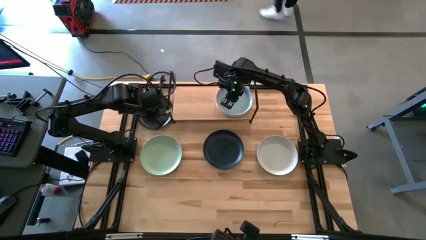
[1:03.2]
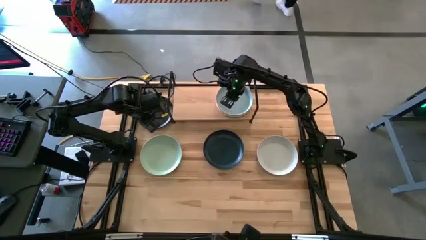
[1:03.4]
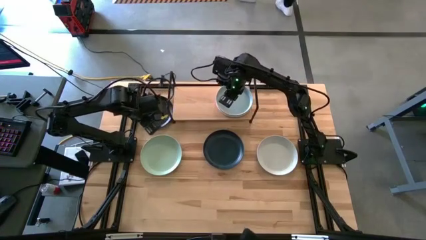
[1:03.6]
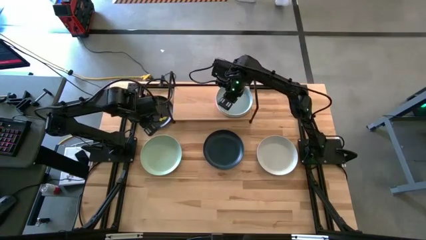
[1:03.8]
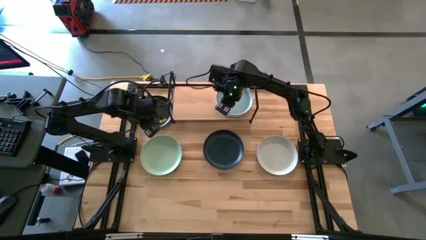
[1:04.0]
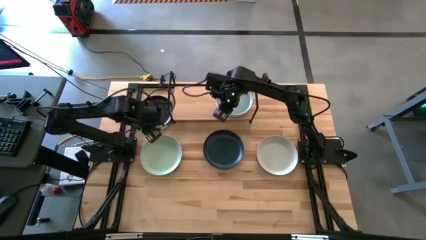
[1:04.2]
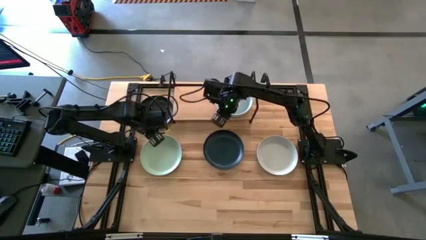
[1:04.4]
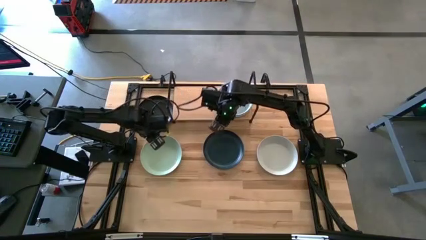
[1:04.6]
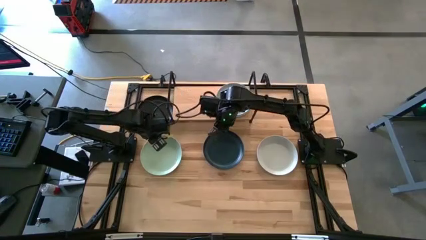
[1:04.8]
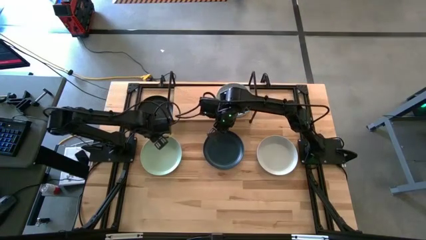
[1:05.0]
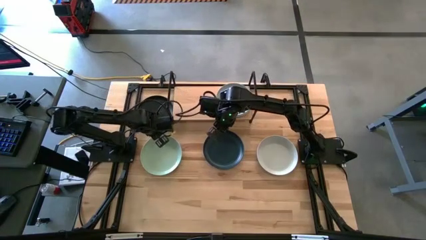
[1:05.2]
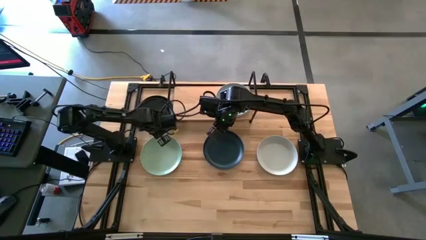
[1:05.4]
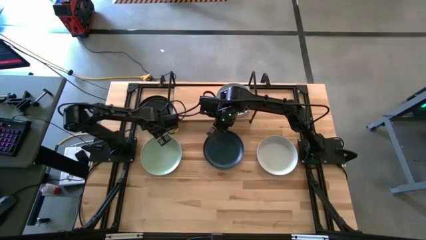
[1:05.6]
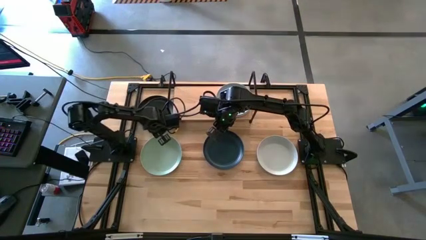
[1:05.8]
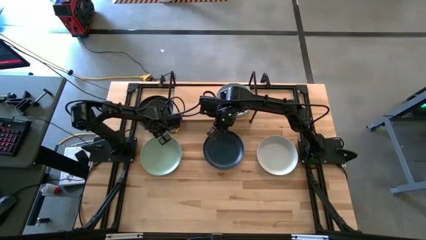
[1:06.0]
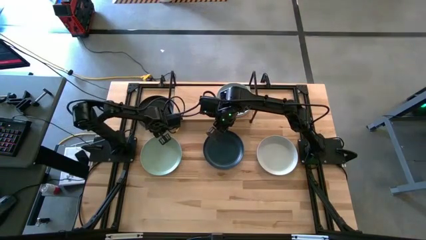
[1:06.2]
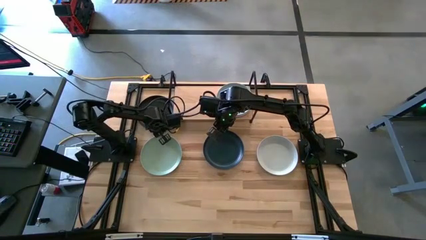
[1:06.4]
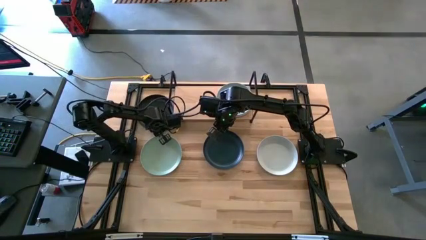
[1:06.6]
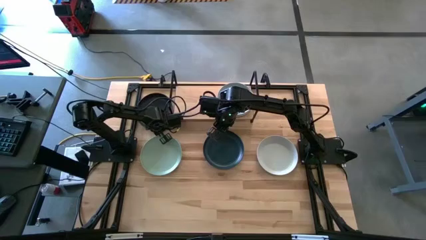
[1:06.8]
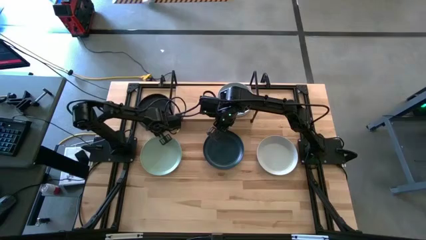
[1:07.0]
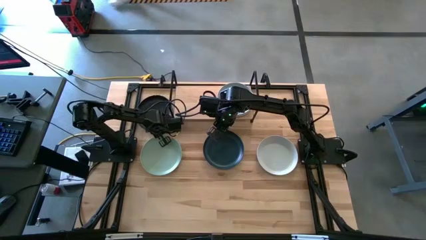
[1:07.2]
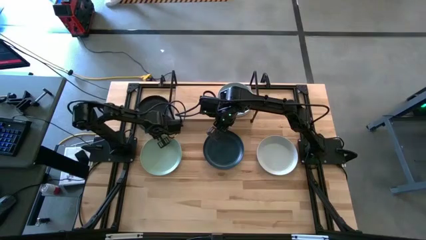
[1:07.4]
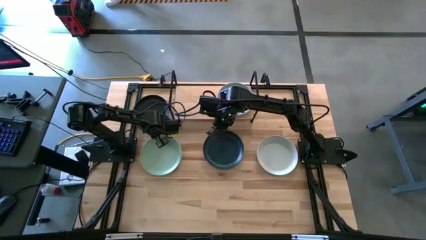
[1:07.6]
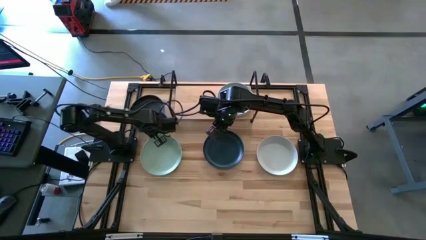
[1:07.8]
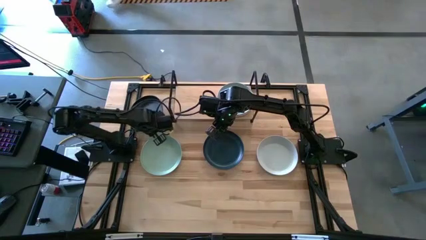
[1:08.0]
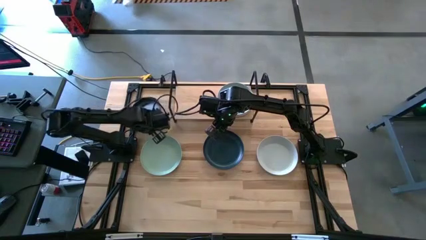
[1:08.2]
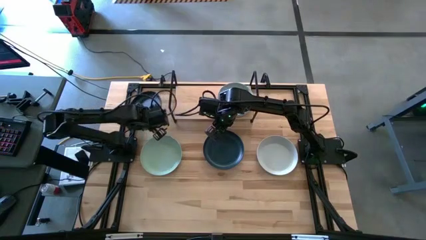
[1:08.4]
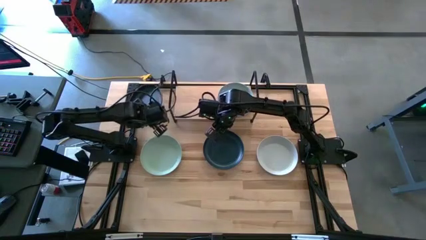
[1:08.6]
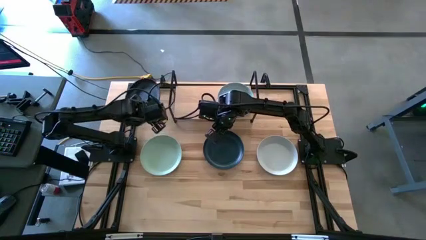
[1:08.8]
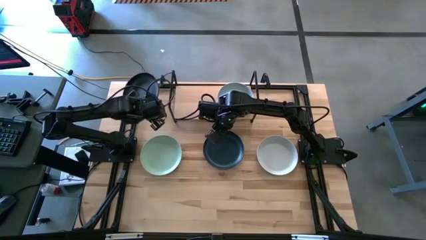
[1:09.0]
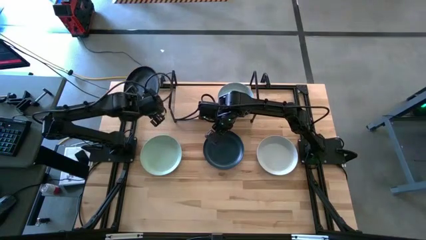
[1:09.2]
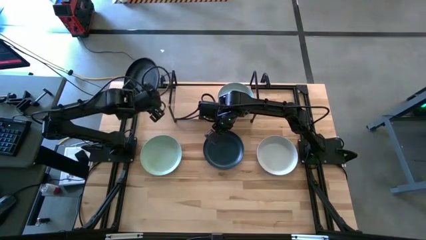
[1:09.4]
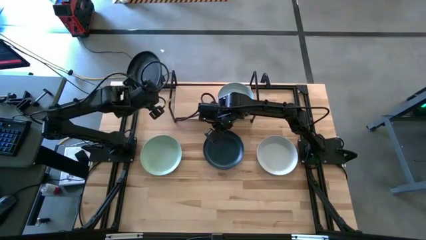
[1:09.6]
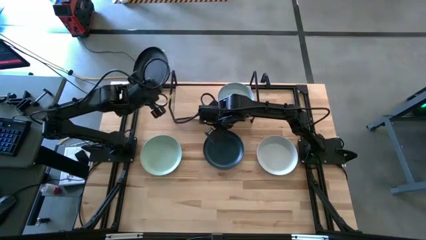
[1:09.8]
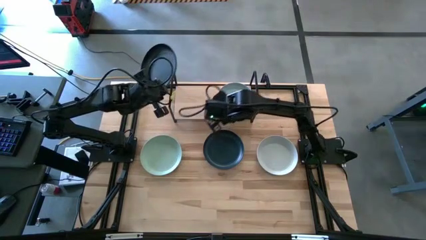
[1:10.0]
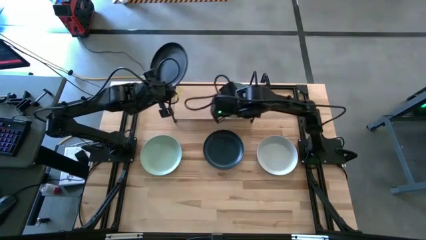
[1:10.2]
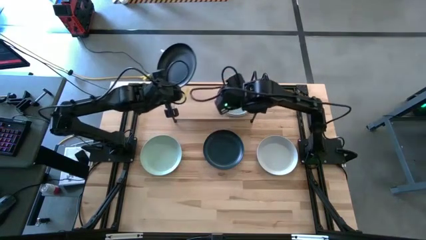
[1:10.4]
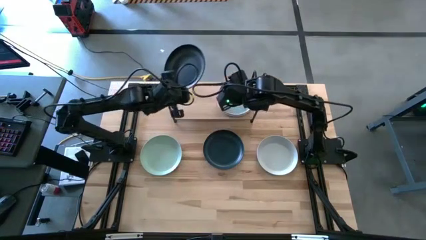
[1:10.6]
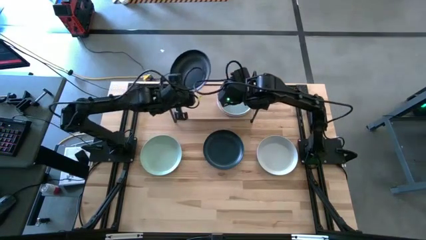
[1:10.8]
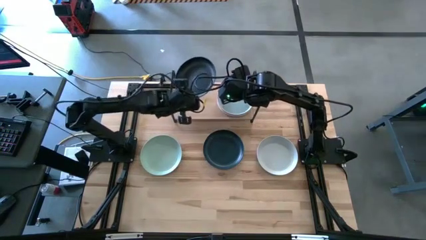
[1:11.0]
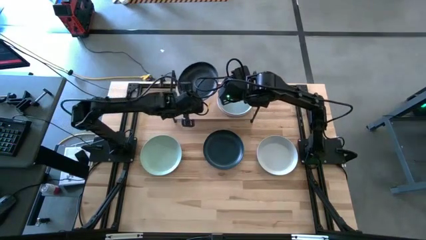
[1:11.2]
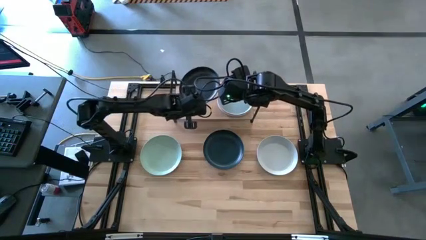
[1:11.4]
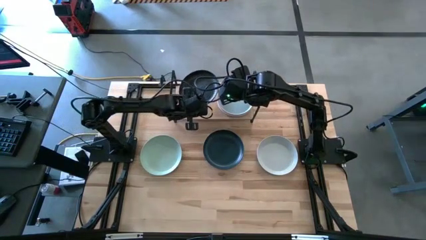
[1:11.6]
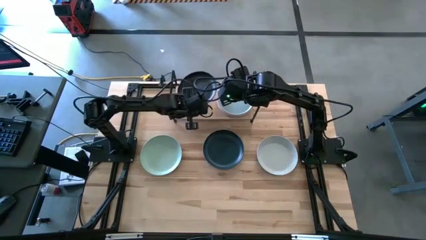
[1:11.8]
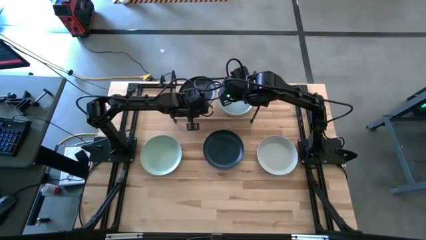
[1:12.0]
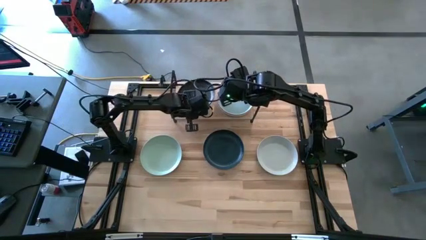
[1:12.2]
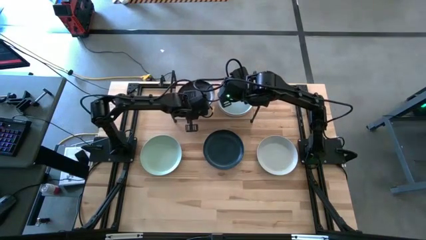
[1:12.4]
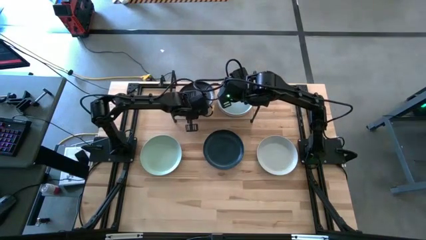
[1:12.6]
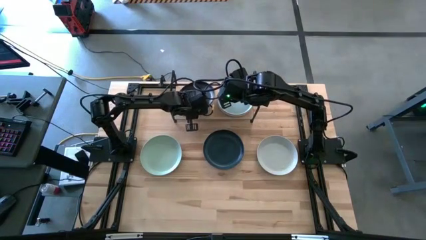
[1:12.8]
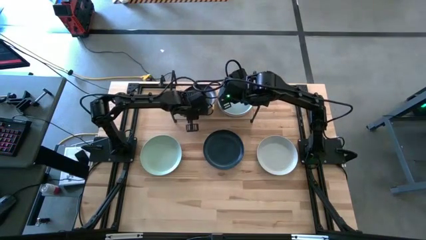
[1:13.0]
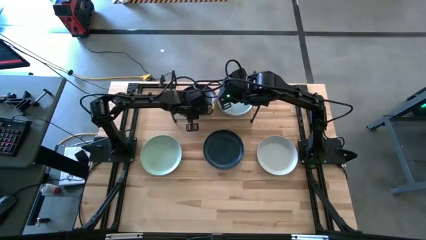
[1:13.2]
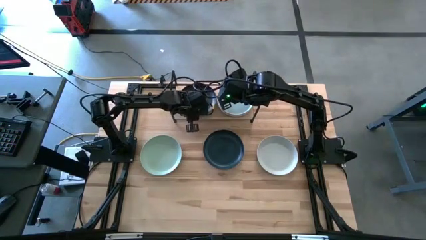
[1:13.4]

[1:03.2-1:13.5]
Task: Place and stack plates onto a shelf
Put the black plate on the shelf

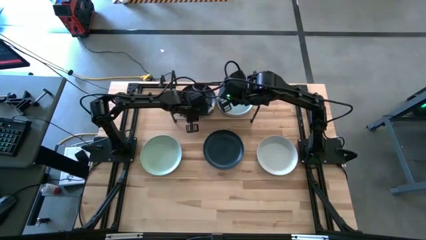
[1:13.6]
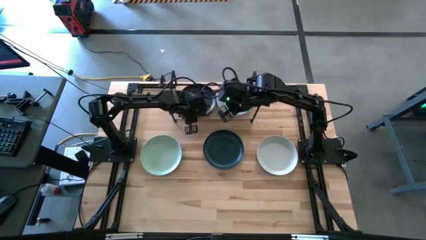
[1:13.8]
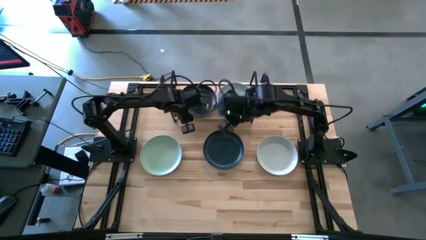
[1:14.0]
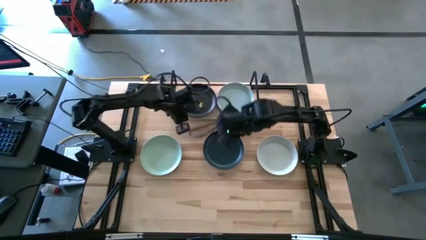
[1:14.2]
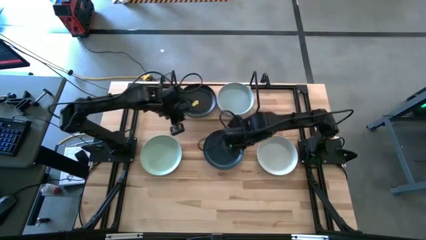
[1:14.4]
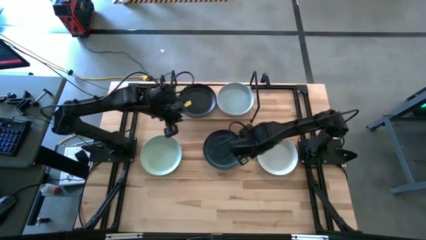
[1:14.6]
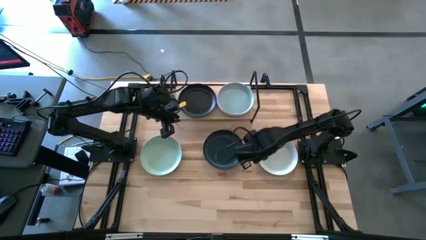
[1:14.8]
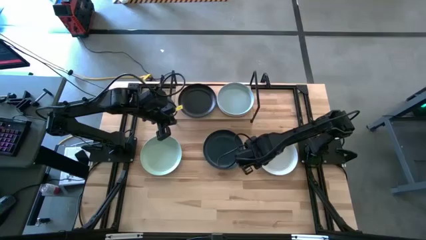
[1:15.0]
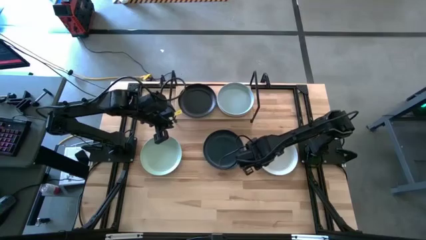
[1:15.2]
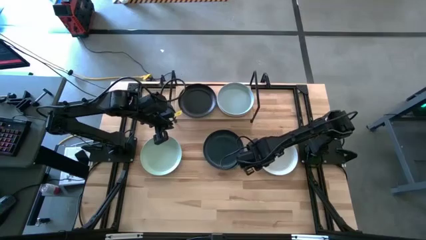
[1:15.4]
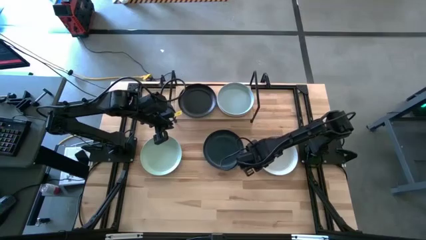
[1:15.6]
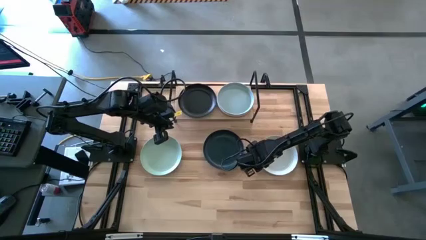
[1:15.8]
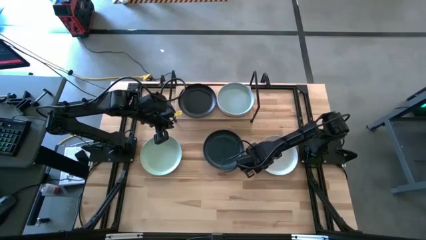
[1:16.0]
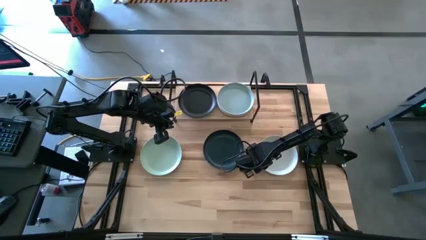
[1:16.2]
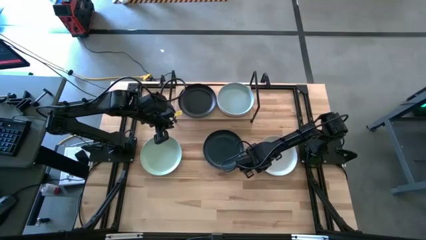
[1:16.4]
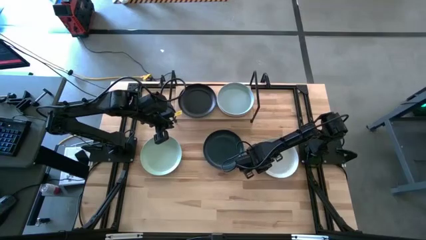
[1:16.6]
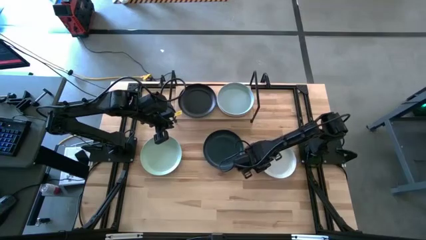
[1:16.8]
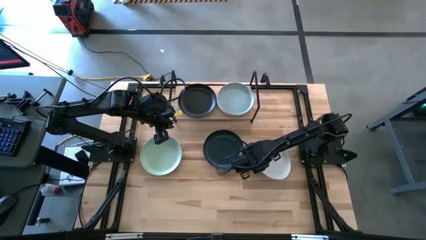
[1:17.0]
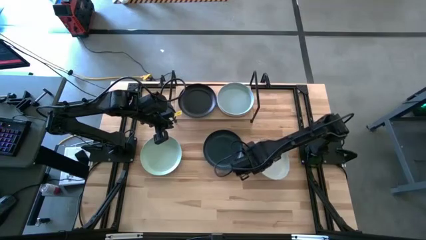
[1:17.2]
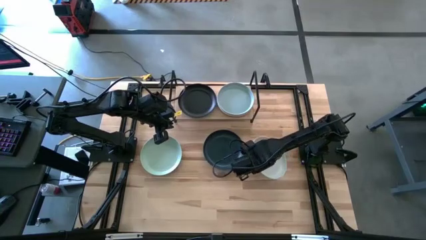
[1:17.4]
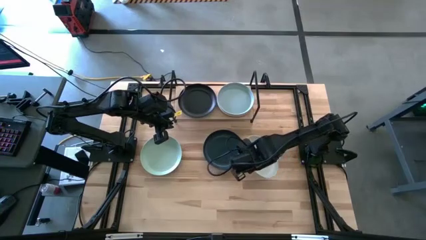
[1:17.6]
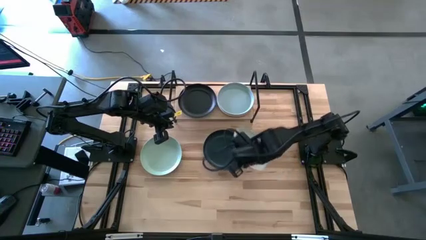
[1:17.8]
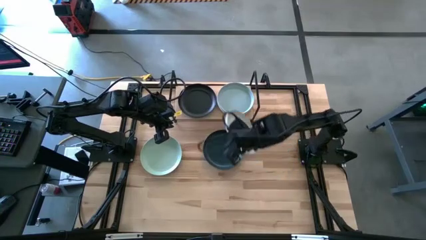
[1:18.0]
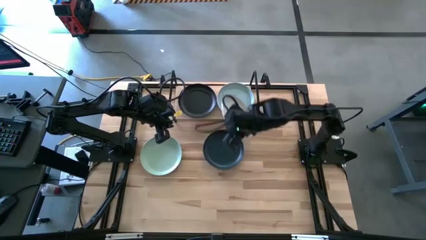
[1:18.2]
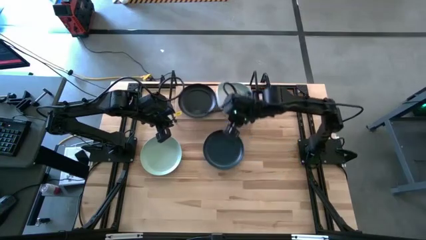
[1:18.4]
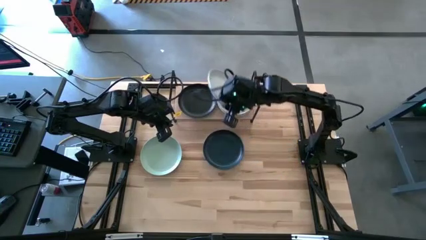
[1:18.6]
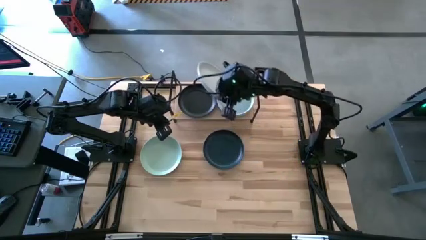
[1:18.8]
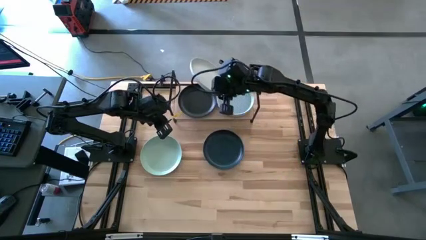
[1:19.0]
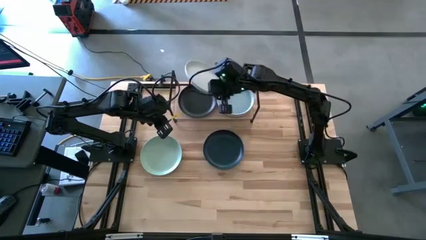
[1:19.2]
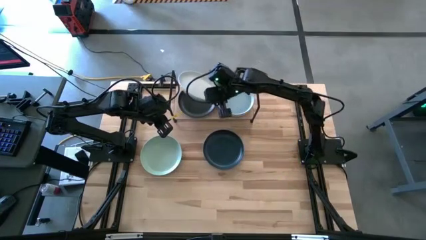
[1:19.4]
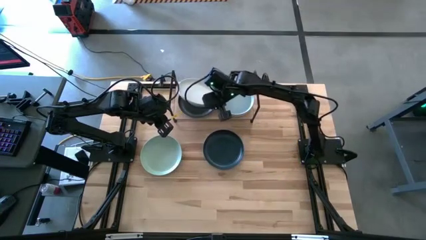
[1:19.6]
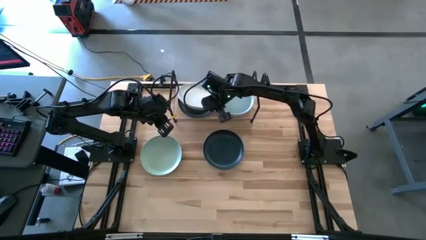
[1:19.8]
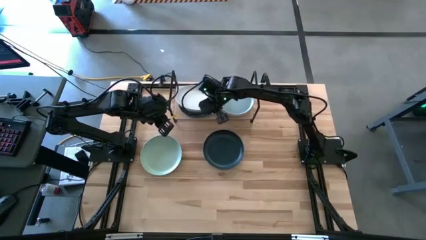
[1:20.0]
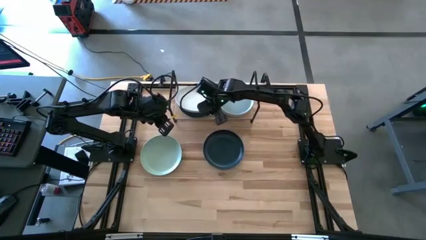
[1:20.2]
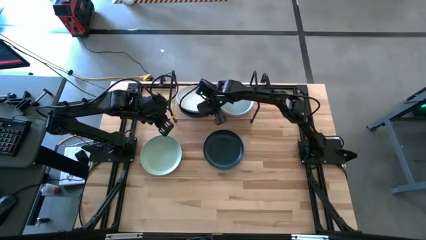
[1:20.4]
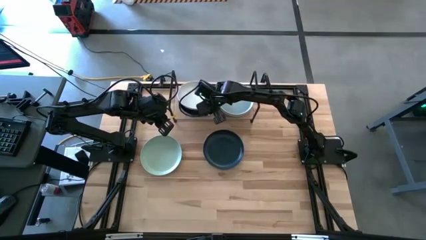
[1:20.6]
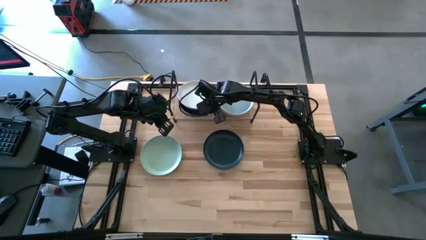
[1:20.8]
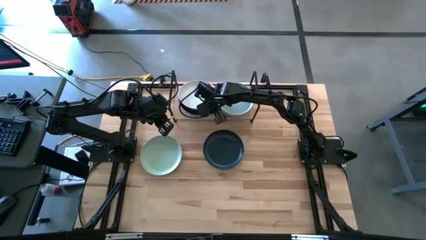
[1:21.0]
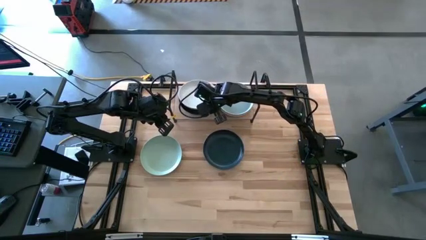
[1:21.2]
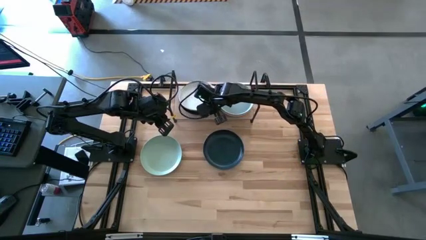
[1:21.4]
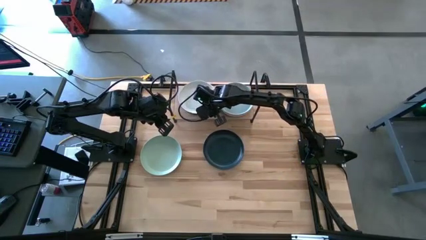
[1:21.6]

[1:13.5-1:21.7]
Stack the white plate on top of the black plate on the shelf
